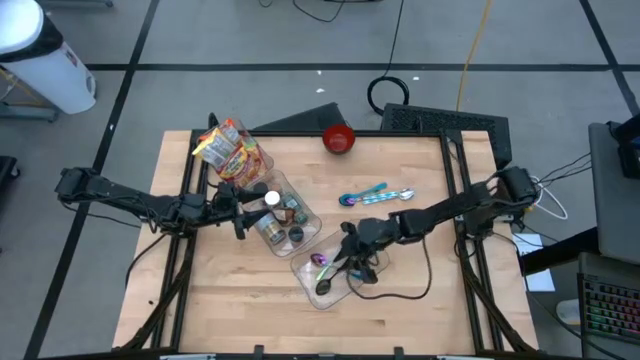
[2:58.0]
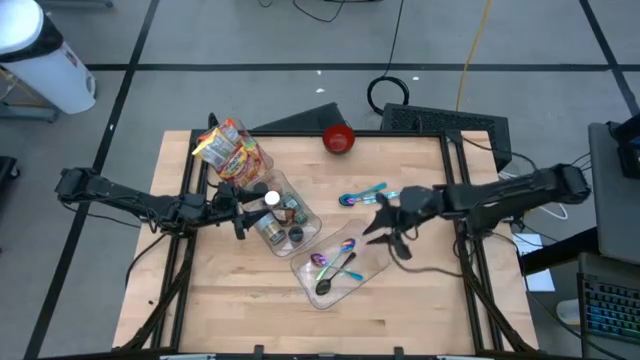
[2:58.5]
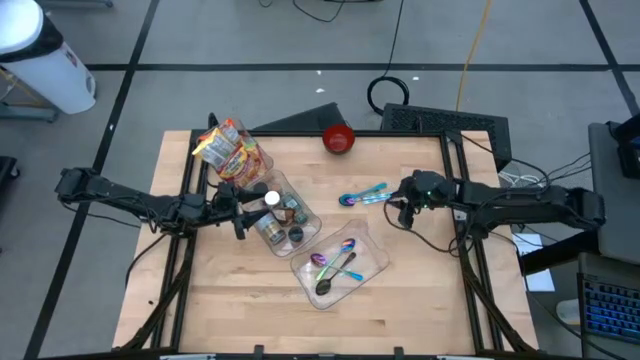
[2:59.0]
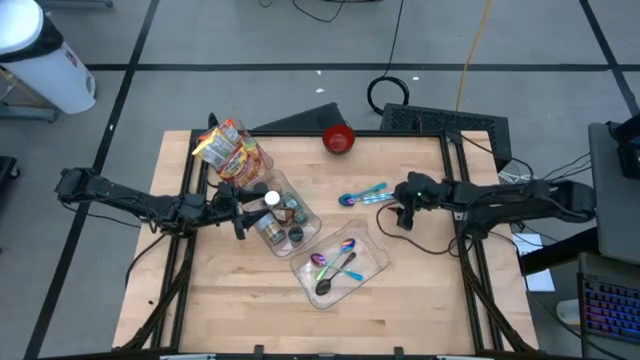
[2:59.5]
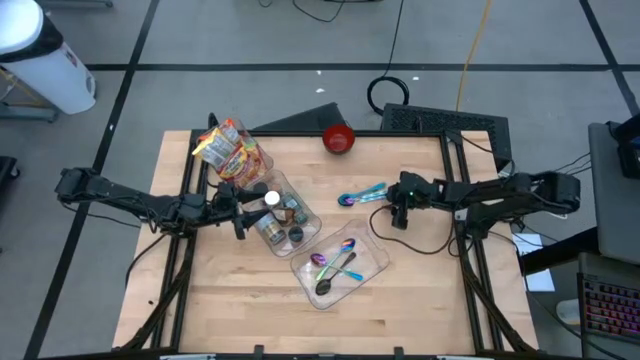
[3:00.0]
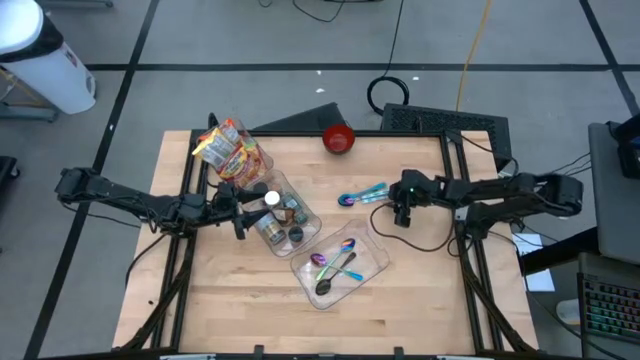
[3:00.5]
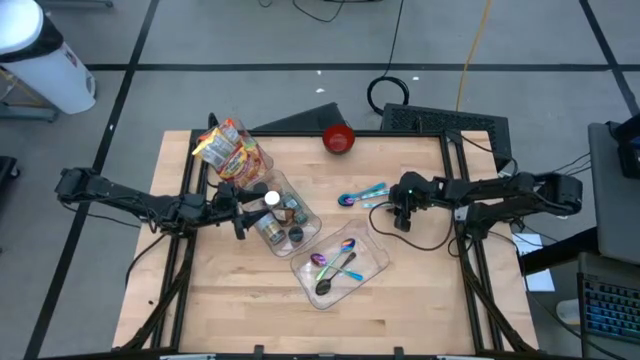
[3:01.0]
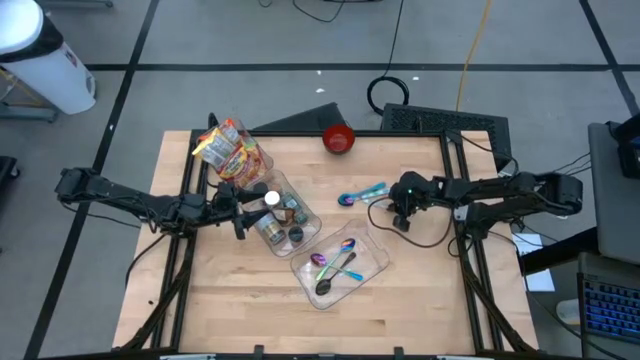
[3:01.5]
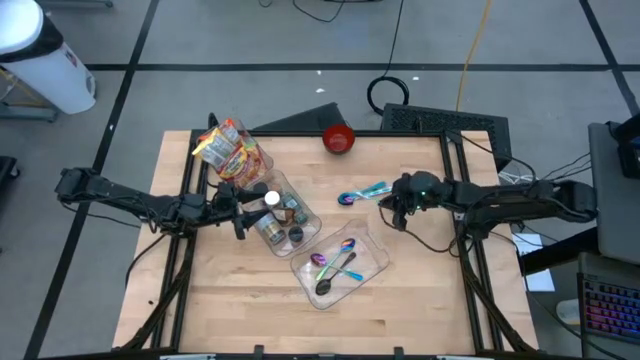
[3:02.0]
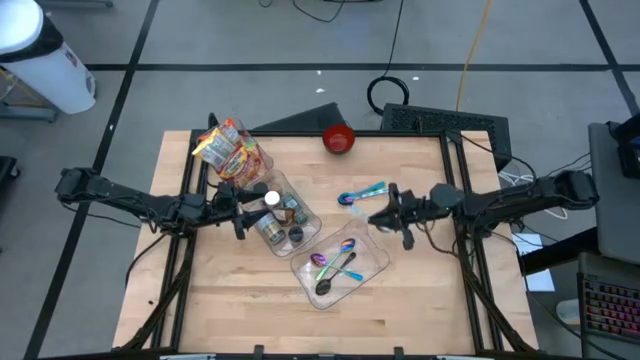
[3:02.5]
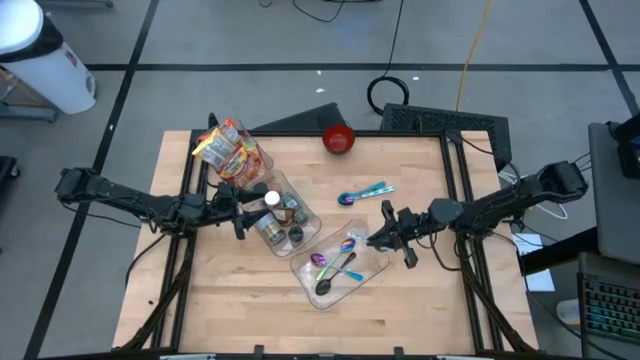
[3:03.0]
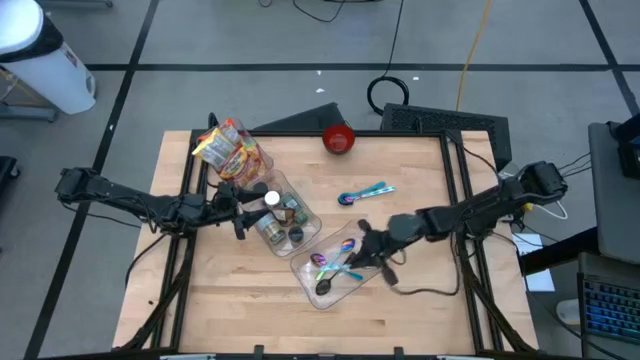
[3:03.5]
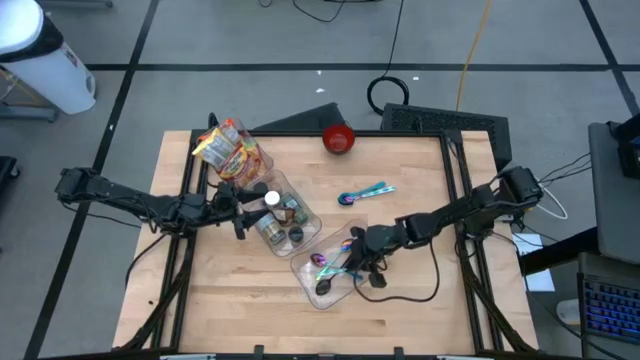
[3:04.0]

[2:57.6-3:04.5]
Task: Pick & Place Food Item
Put the bottom blue and white spoon into the bottom transparent bin

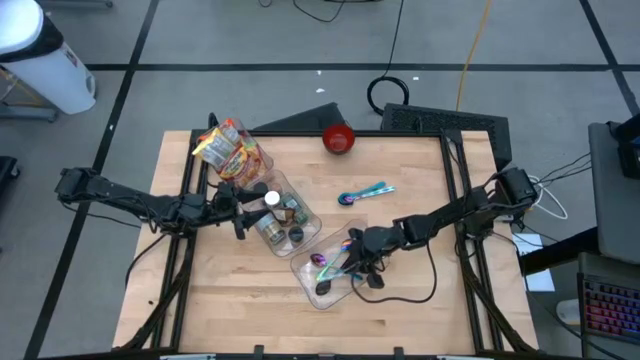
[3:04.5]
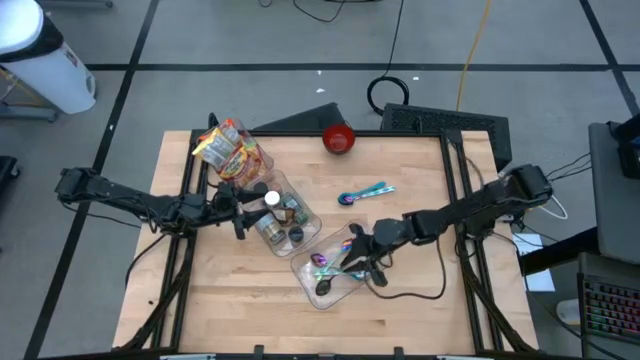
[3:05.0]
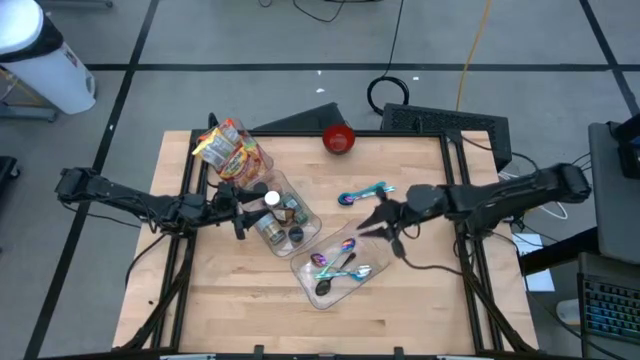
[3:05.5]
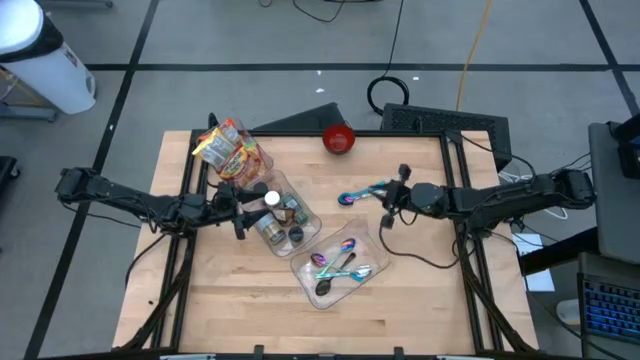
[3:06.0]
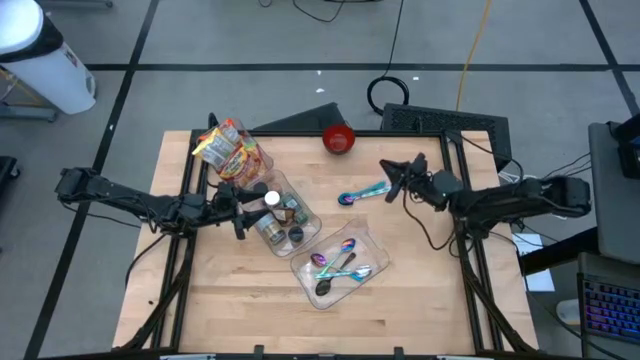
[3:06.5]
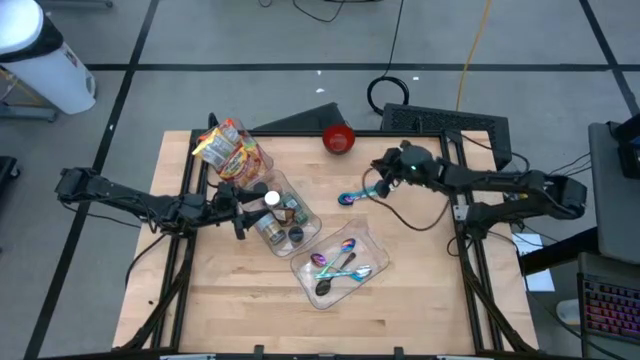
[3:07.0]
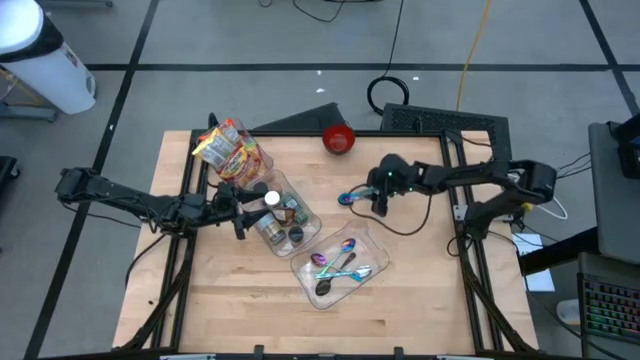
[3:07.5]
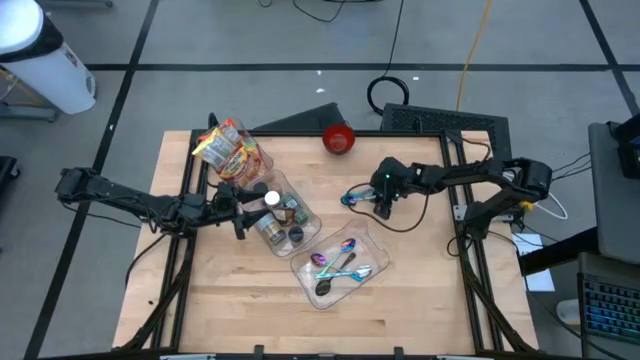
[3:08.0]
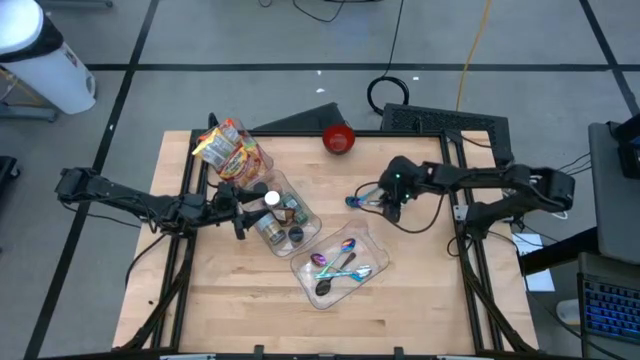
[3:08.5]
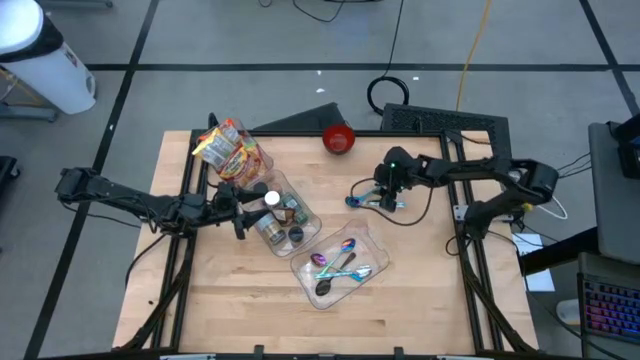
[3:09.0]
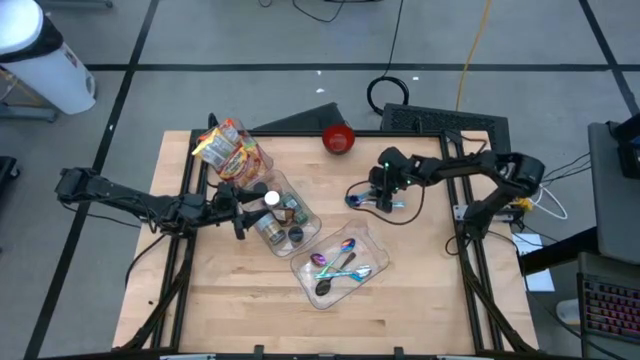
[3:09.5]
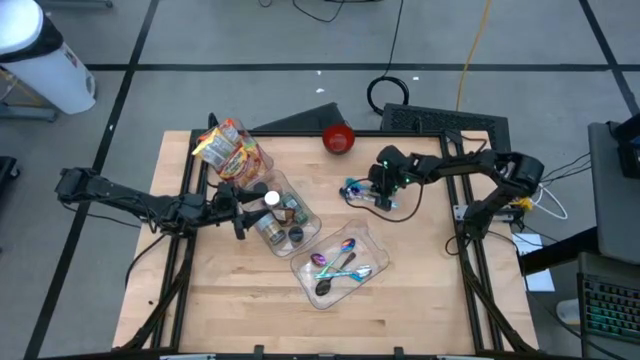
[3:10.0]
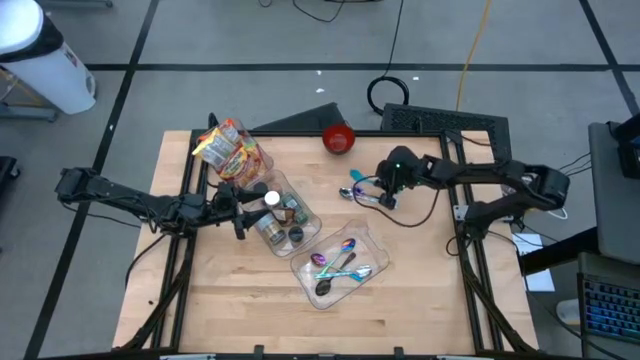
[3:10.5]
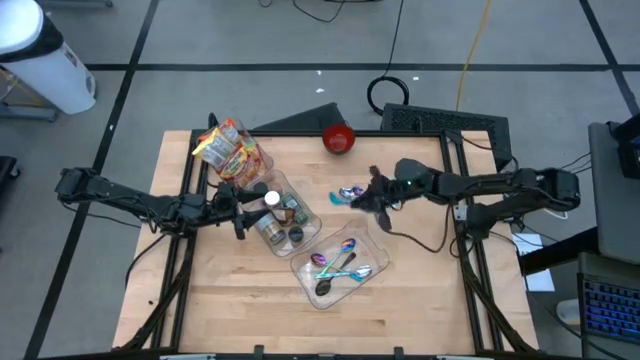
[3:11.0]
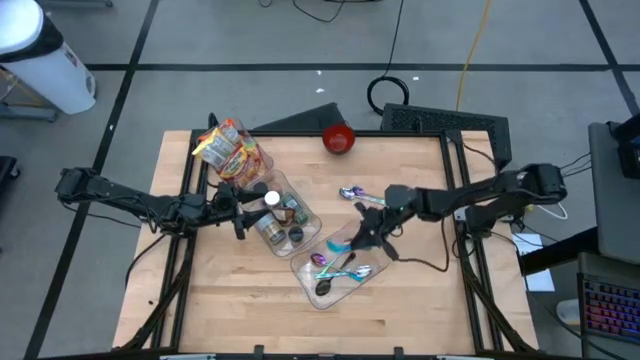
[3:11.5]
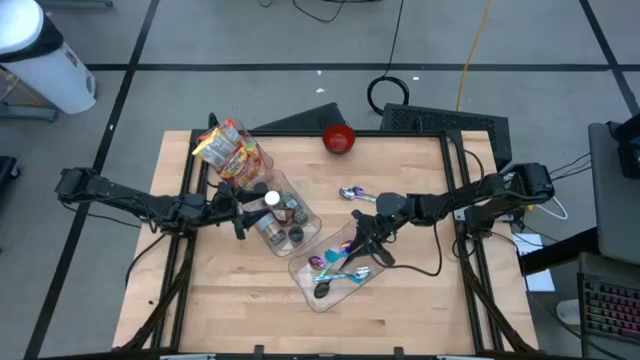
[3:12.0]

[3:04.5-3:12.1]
Put the blue spoon into the bottom transparent bin

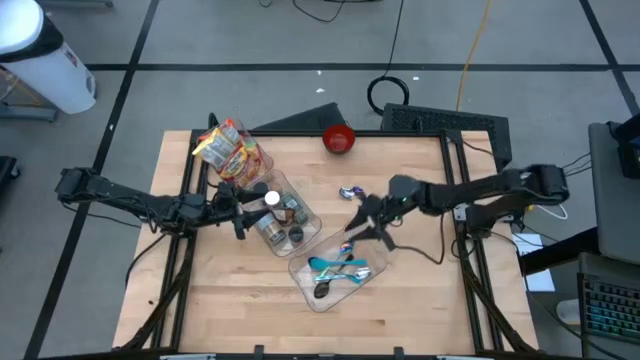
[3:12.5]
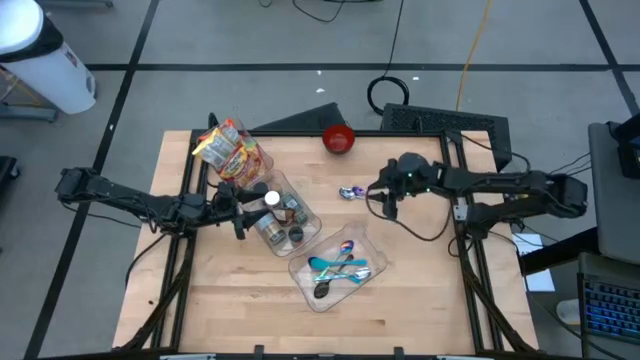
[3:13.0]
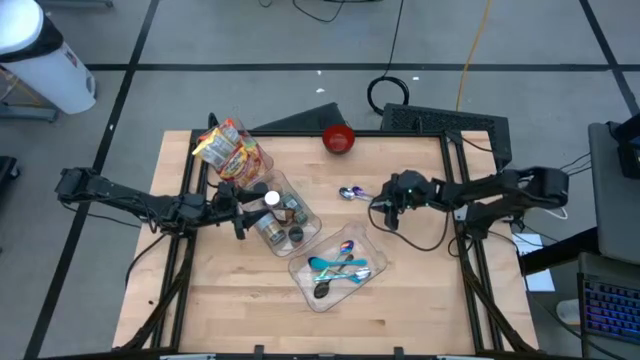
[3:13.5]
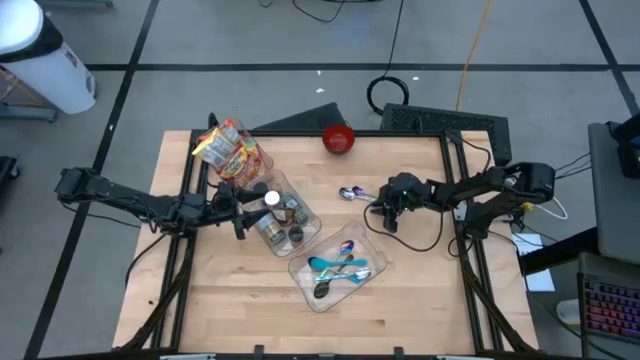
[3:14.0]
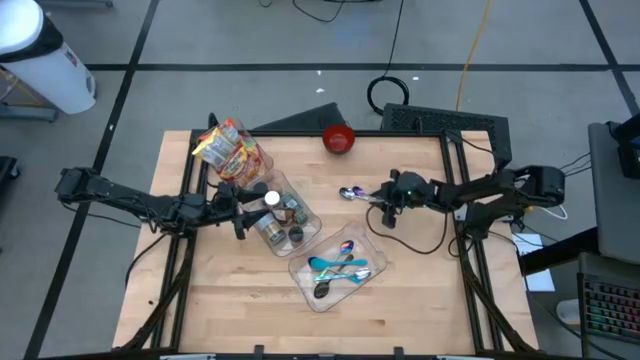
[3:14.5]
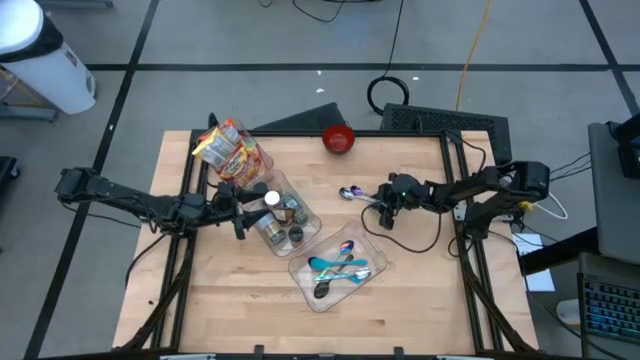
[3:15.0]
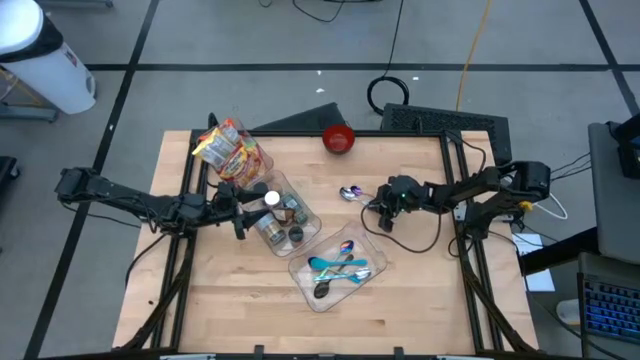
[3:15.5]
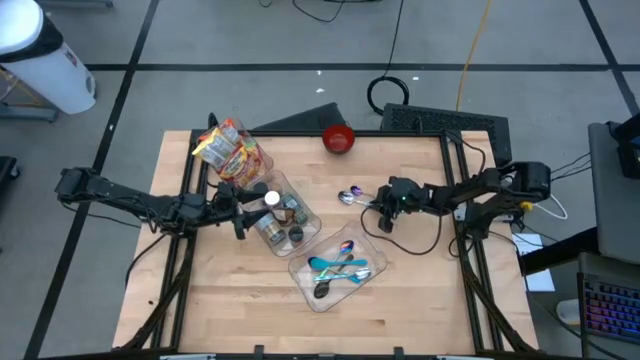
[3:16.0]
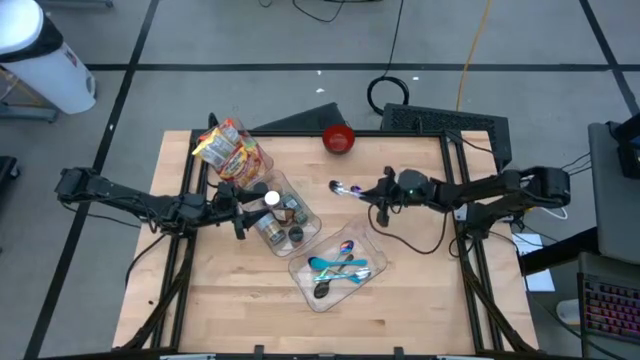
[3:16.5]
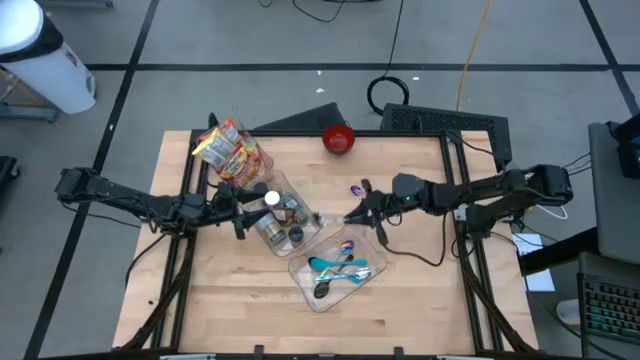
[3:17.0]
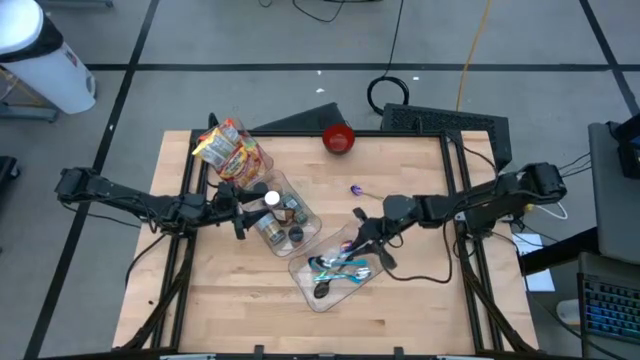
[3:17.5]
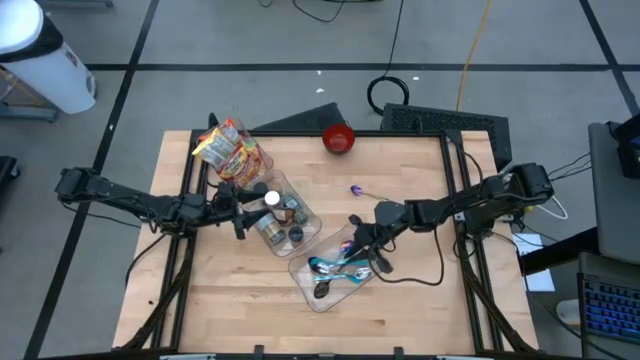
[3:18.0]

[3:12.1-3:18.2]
Put the blue and white spoon into the bottom transparent bin

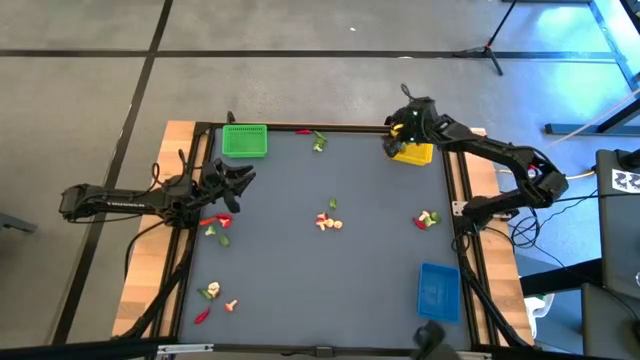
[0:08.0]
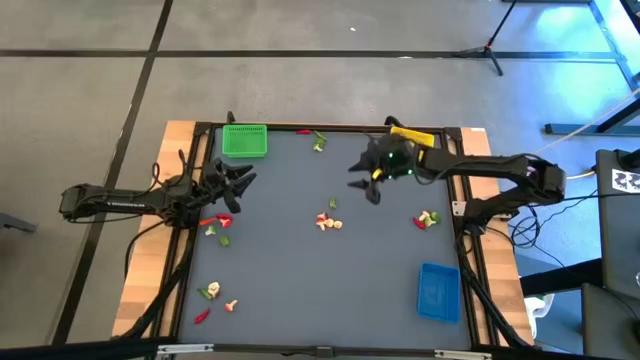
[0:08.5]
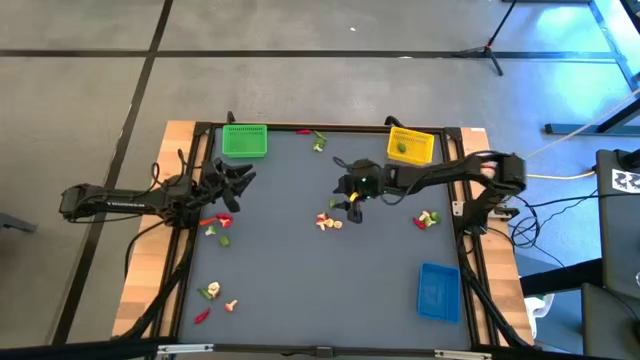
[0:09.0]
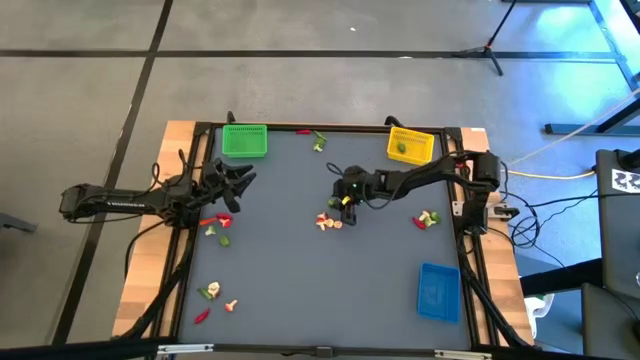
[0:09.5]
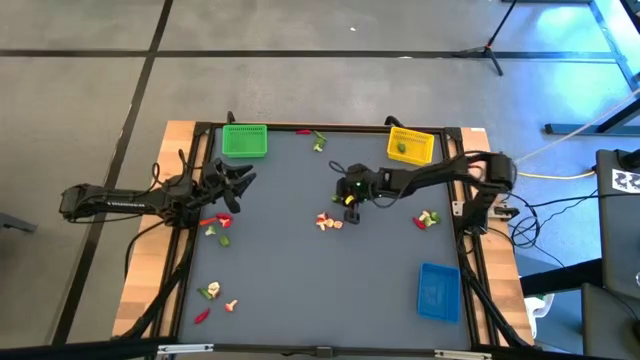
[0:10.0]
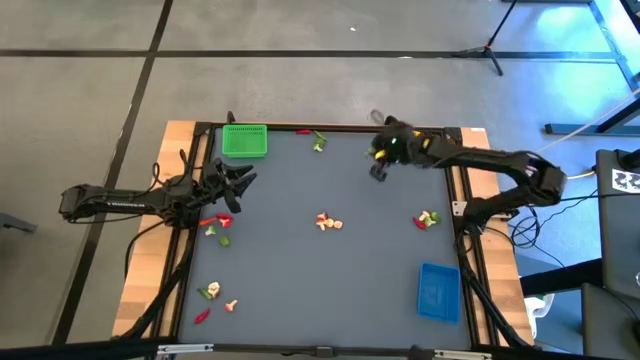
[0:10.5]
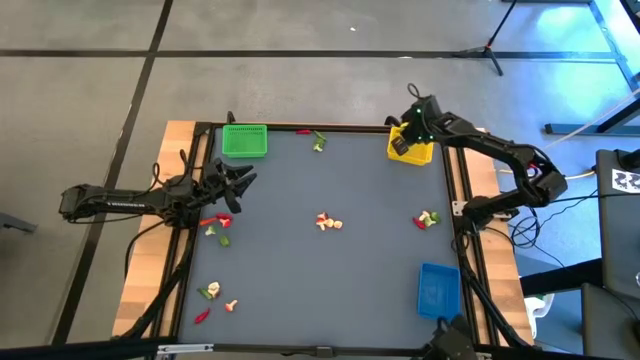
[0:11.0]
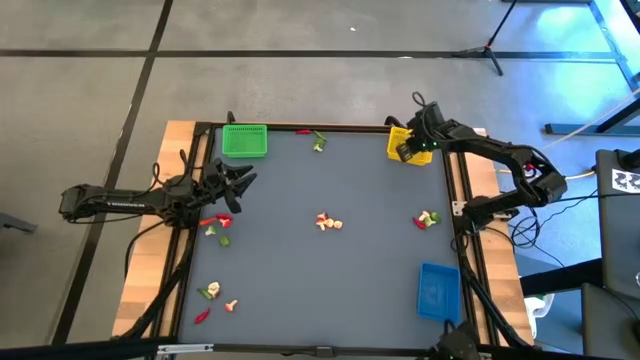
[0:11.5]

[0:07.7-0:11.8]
Task: Sort produce into baskets
Put the green chili pepper into the yellow bin
